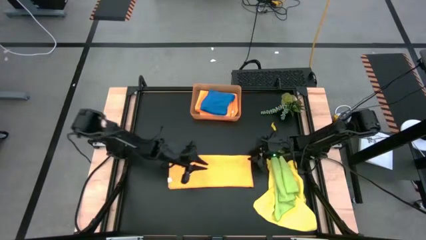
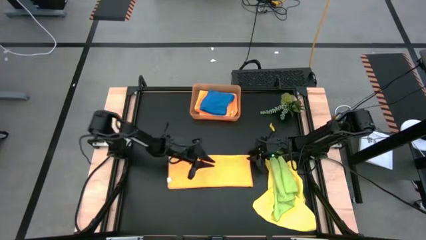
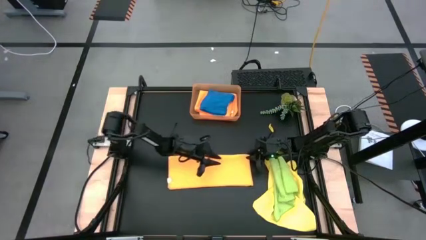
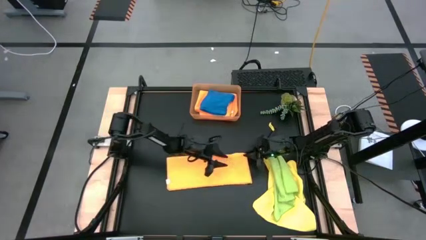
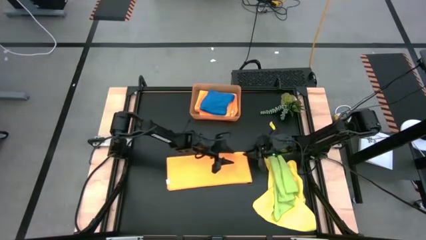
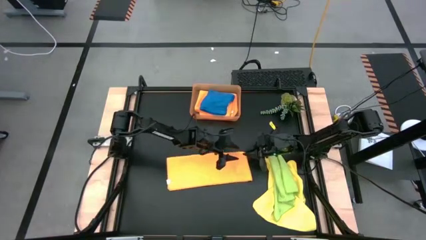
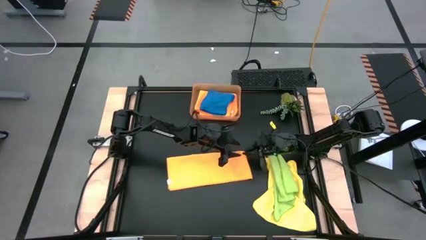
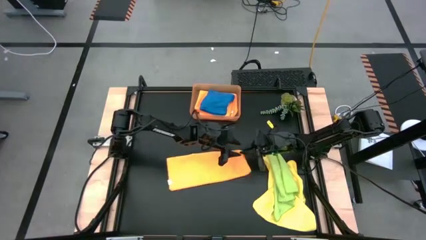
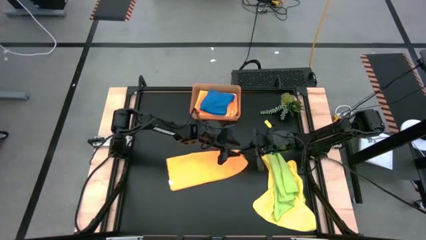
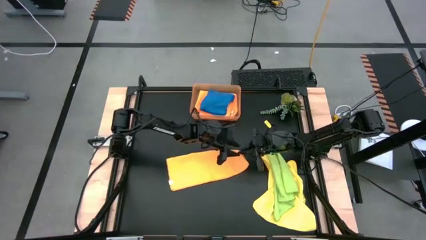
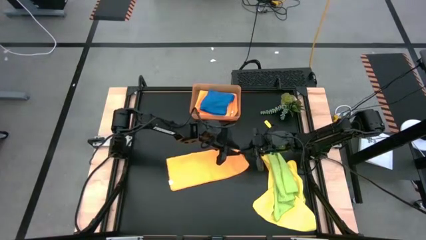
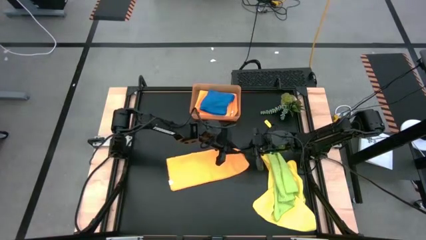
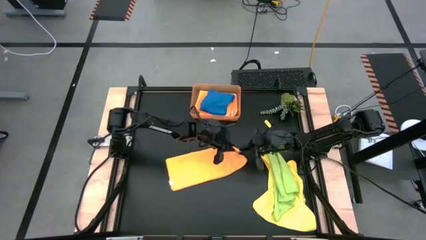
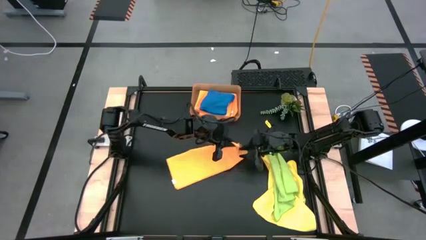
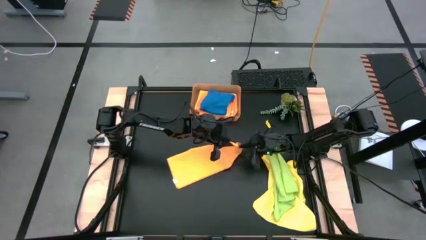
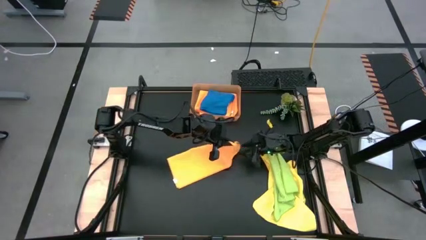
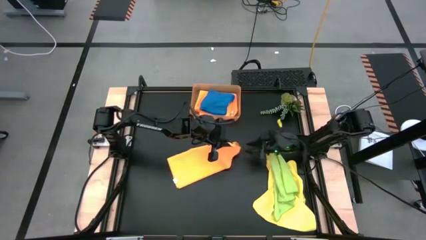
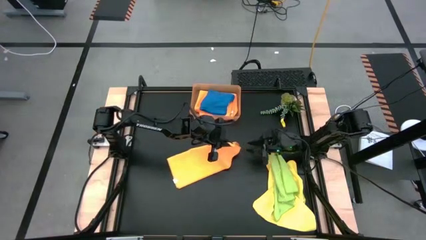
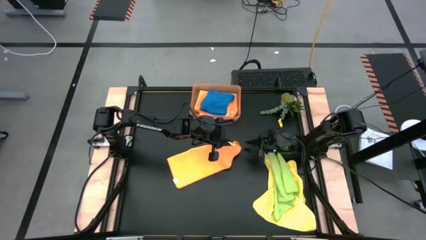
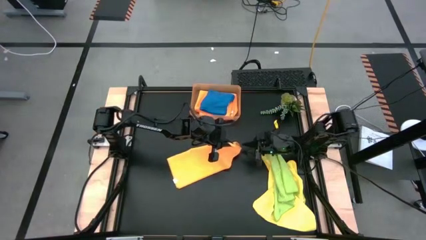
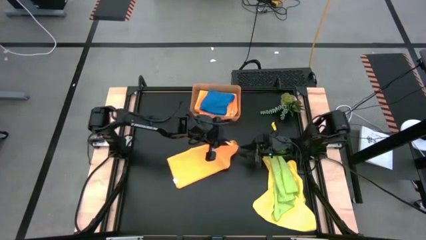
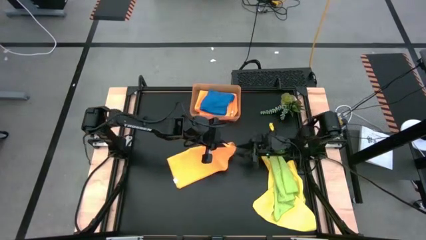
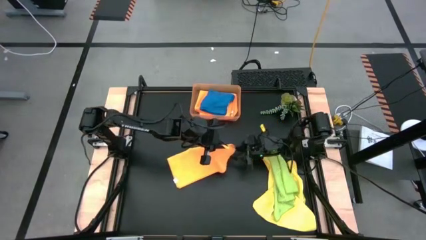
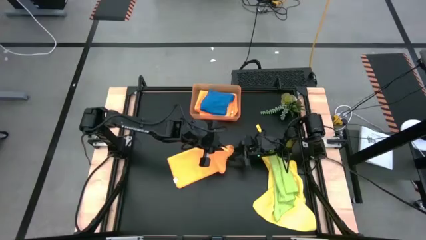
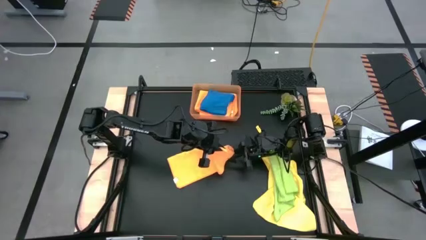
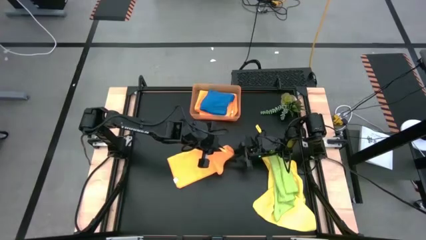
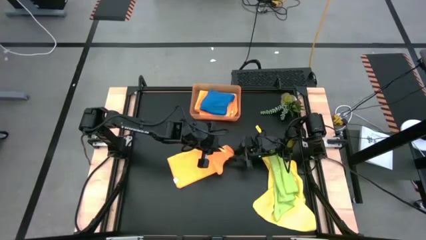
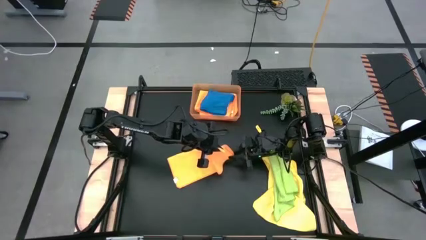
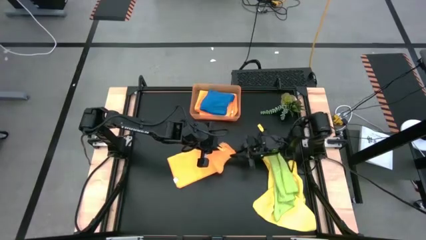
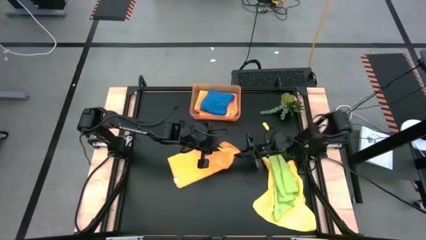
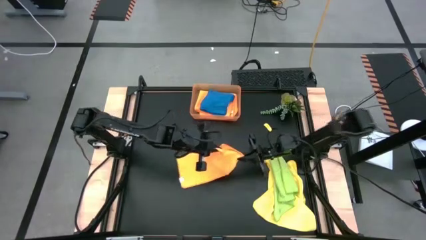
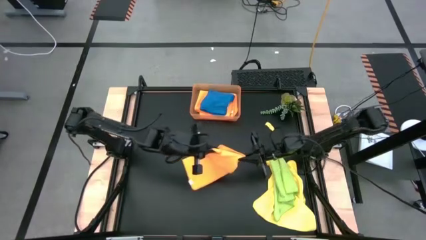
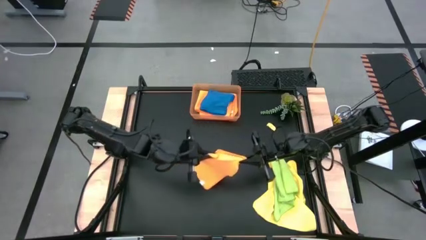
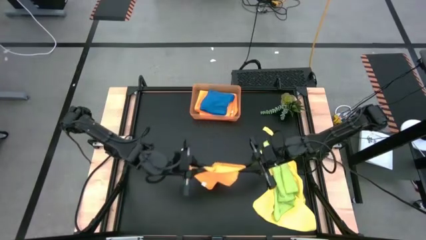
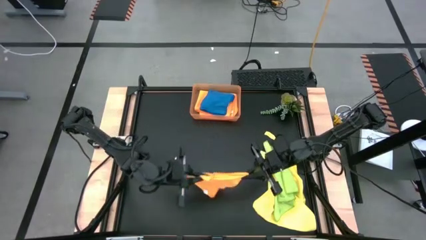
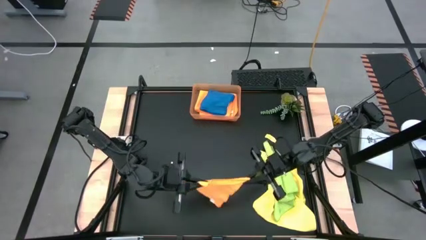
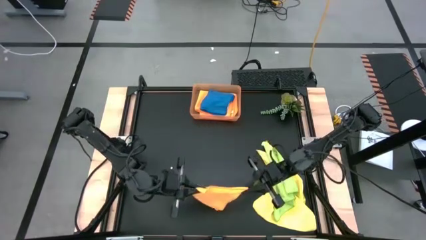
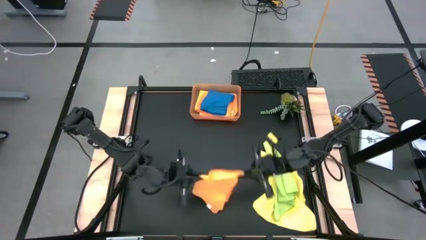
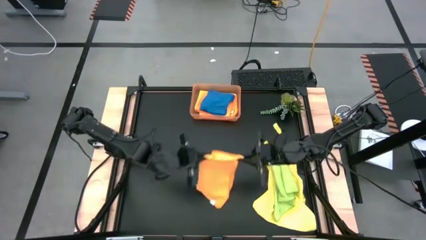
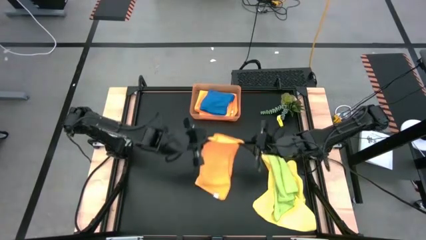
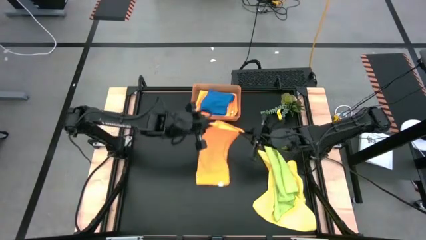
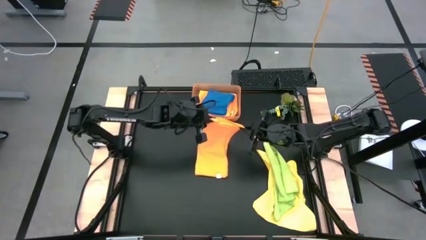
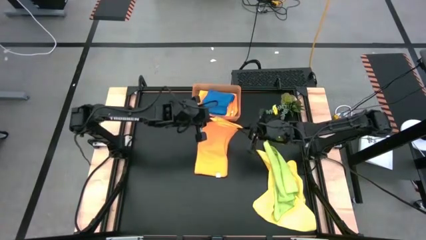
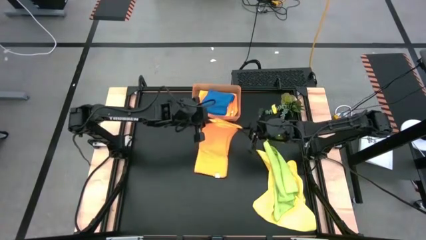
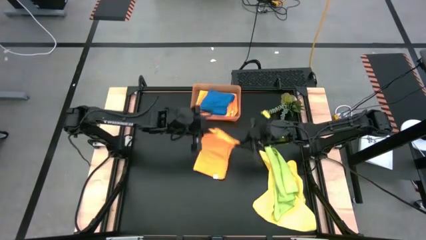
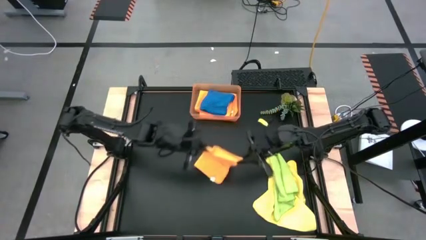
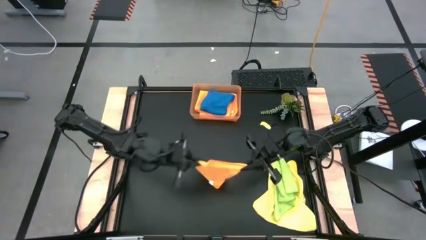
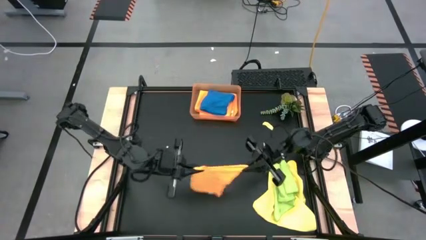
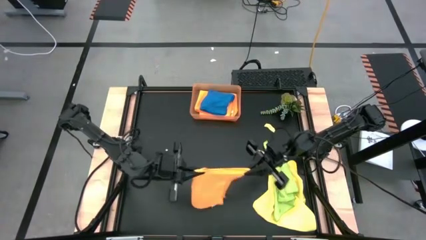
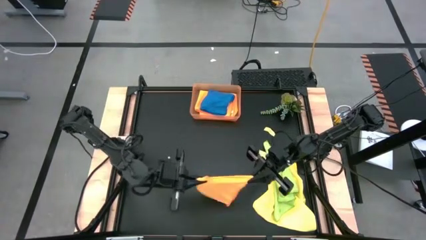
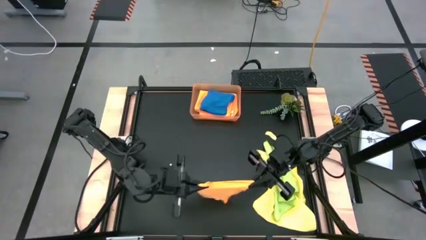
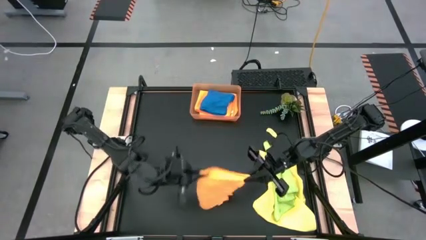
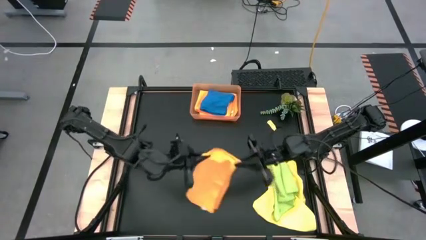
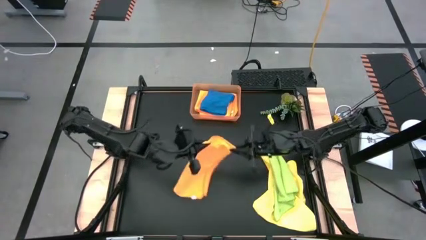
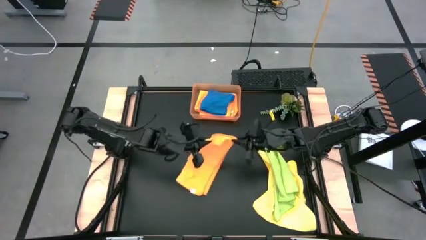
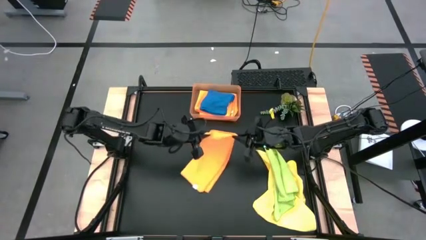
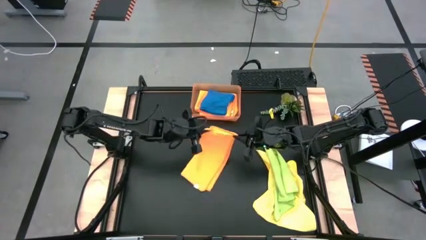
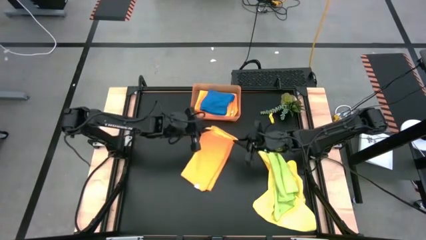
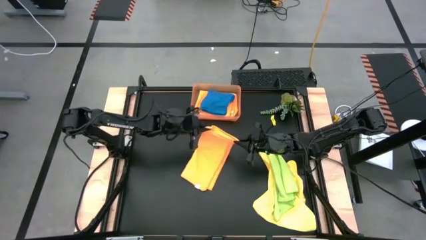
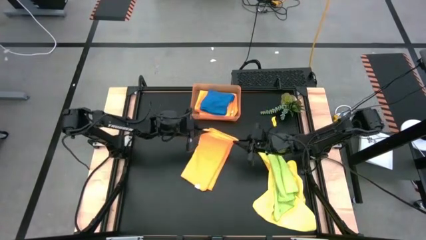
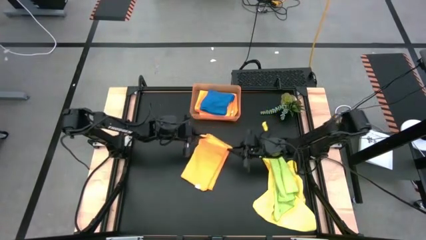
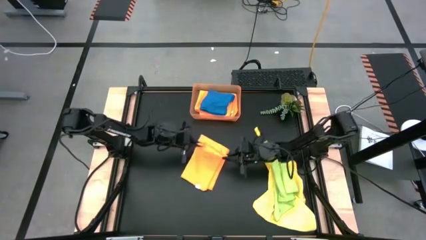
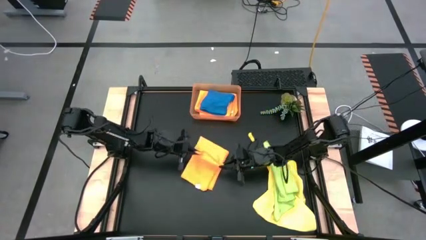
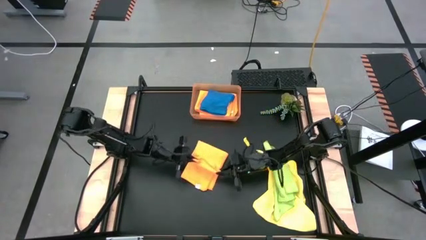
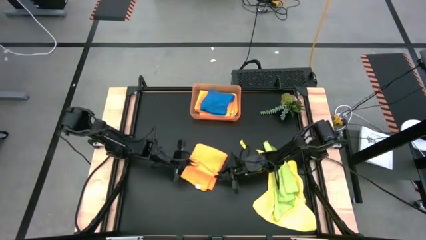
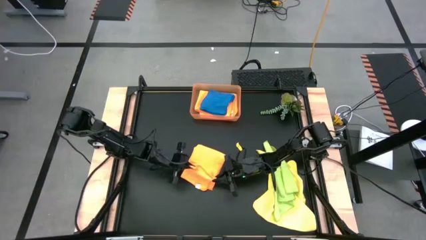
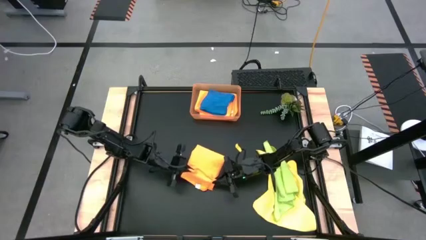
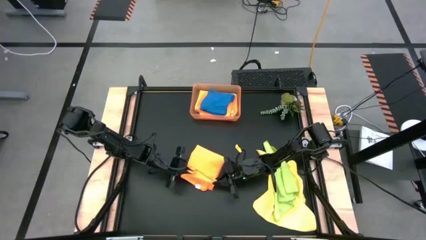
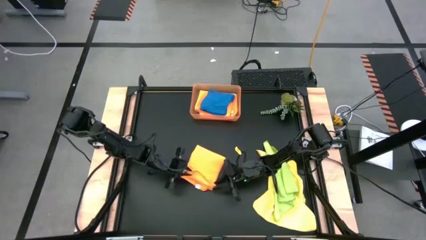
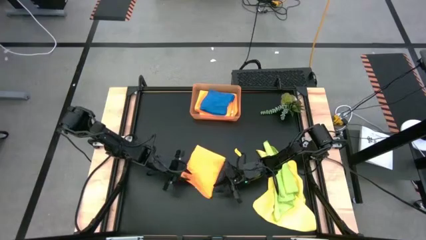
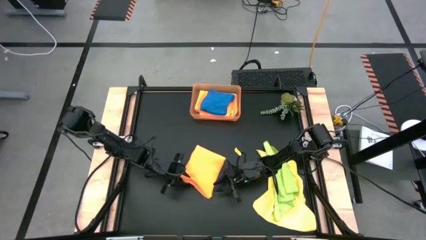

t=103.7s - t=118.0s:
Task: Fold microfiber towels
Fold the orange towel
